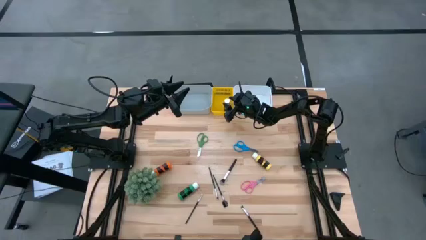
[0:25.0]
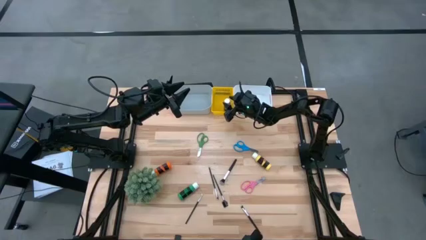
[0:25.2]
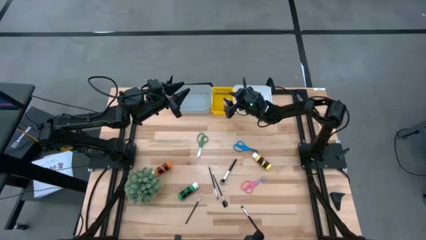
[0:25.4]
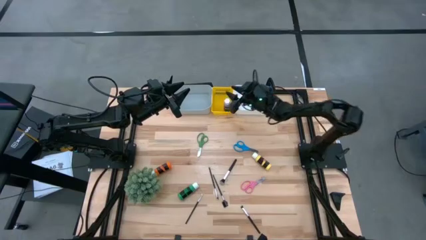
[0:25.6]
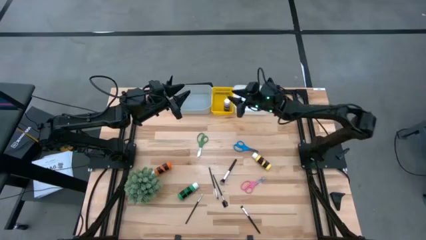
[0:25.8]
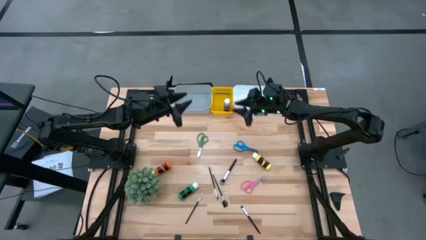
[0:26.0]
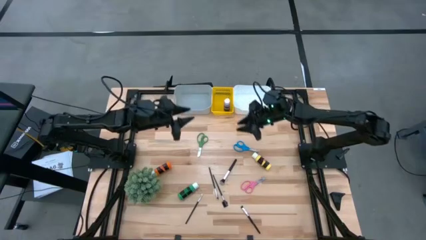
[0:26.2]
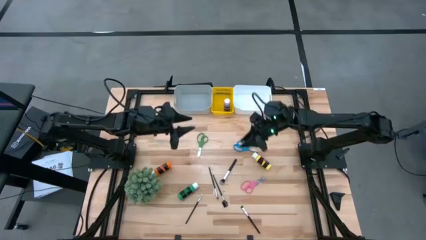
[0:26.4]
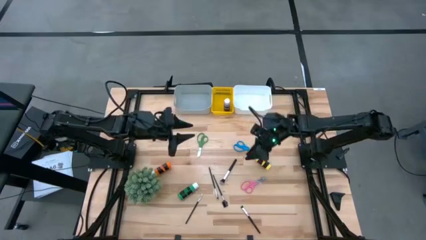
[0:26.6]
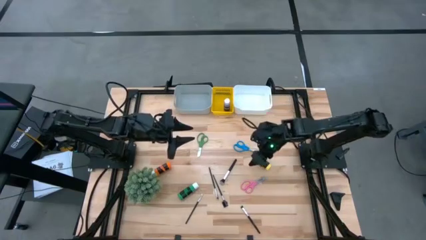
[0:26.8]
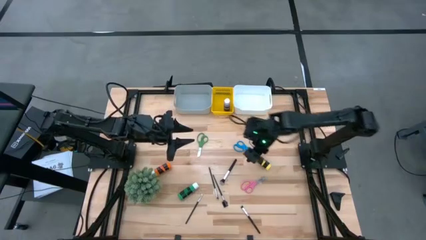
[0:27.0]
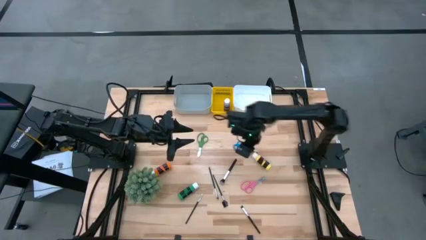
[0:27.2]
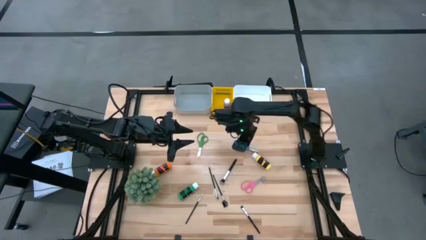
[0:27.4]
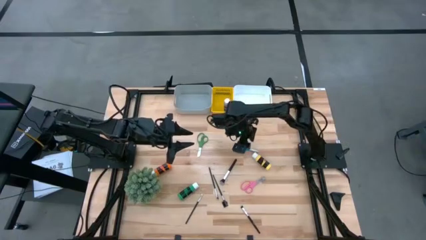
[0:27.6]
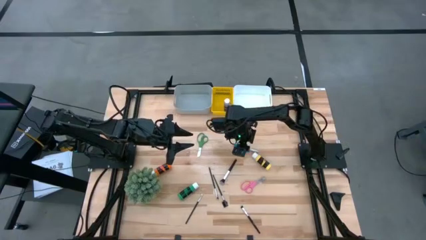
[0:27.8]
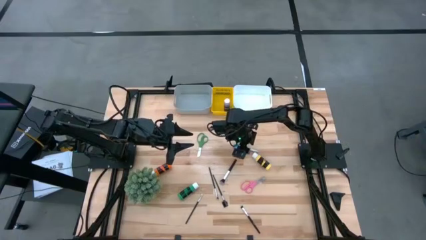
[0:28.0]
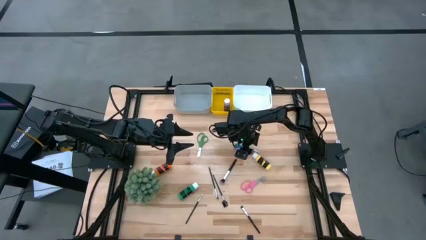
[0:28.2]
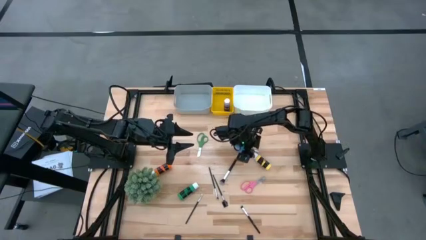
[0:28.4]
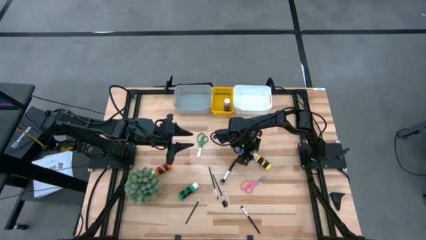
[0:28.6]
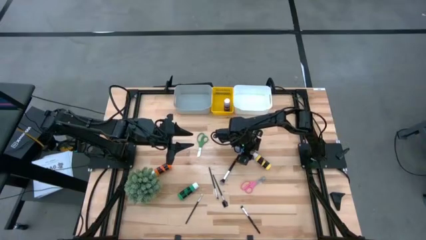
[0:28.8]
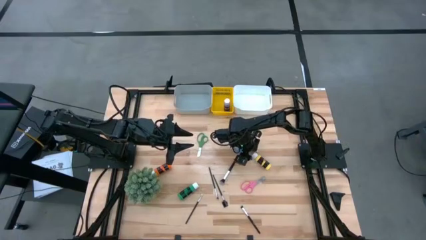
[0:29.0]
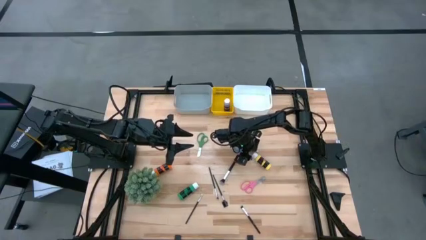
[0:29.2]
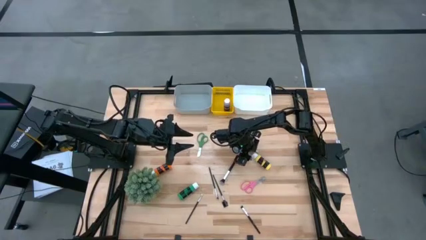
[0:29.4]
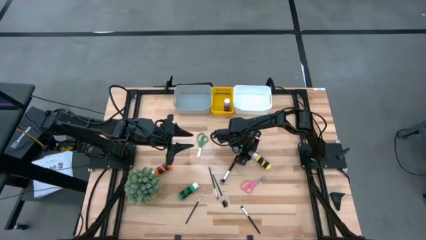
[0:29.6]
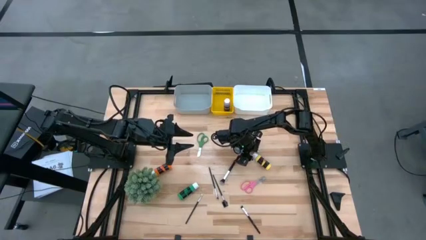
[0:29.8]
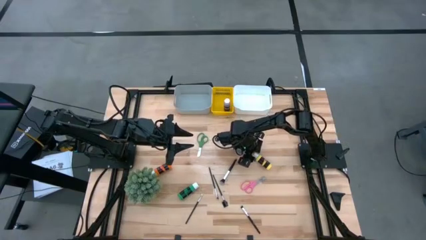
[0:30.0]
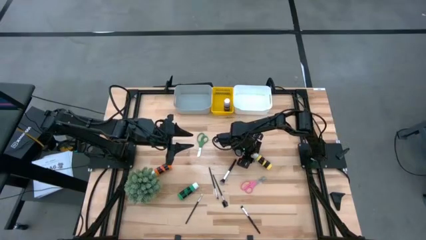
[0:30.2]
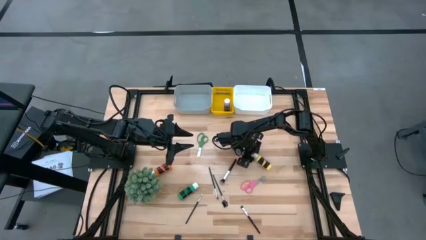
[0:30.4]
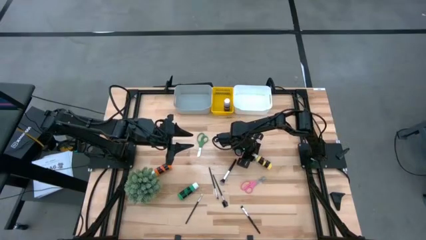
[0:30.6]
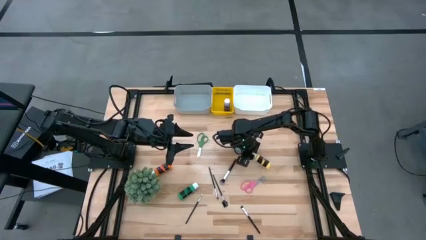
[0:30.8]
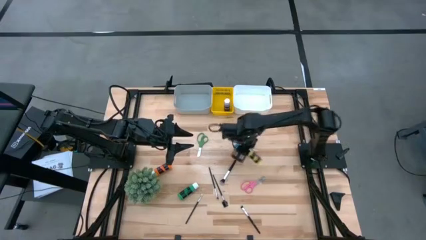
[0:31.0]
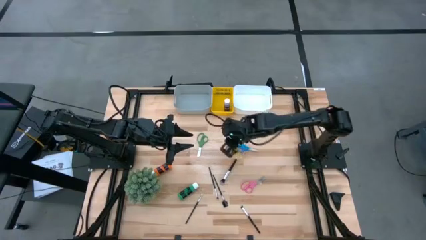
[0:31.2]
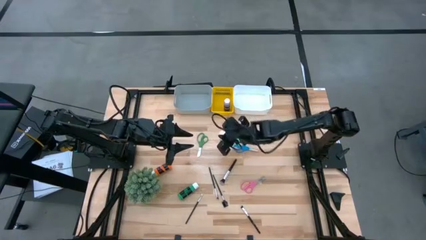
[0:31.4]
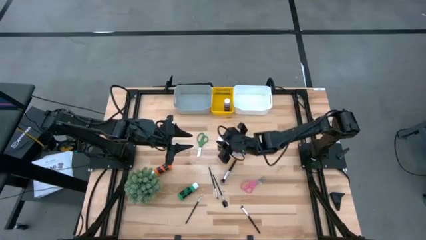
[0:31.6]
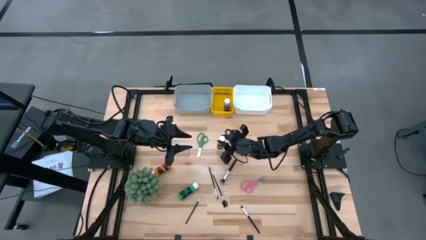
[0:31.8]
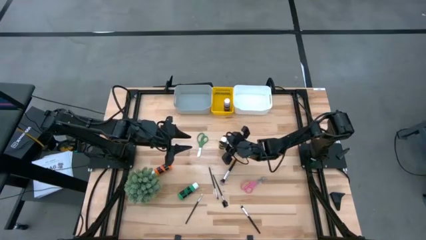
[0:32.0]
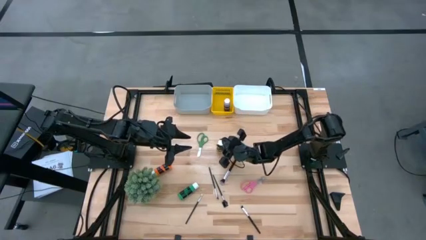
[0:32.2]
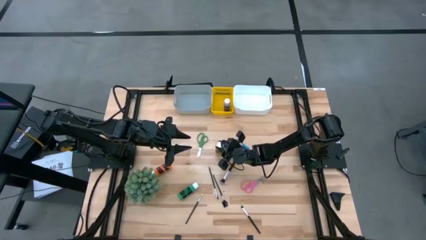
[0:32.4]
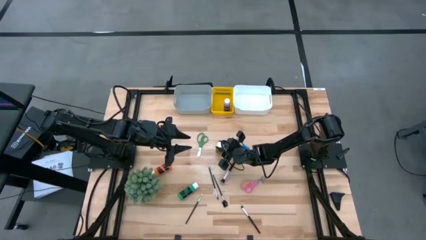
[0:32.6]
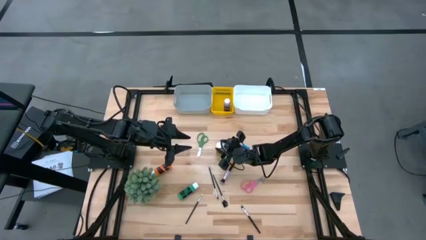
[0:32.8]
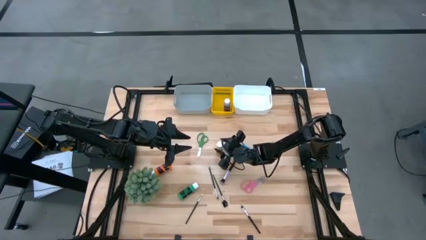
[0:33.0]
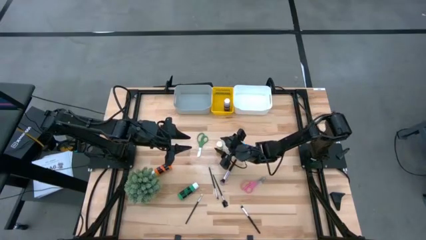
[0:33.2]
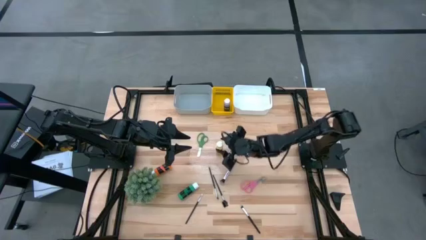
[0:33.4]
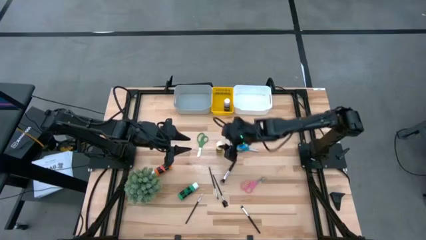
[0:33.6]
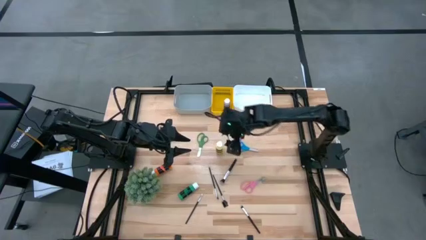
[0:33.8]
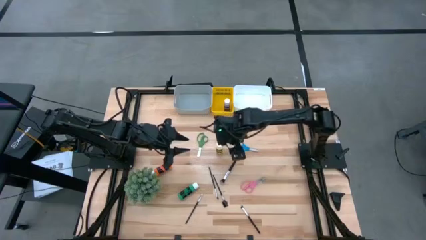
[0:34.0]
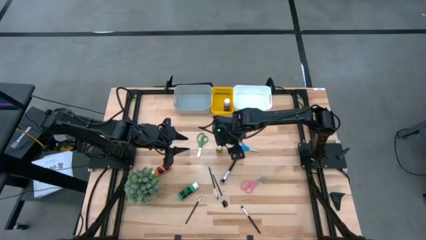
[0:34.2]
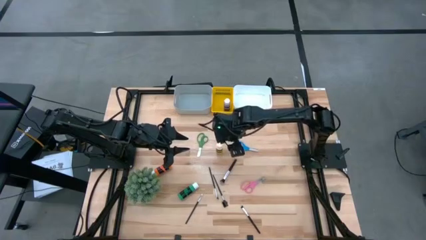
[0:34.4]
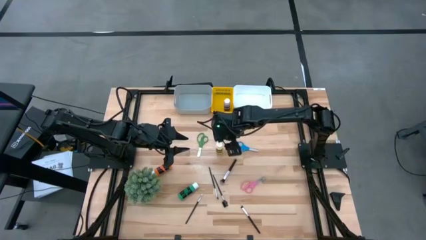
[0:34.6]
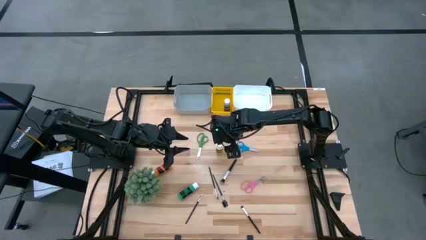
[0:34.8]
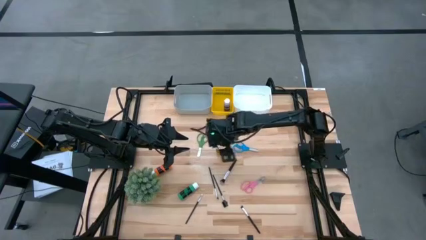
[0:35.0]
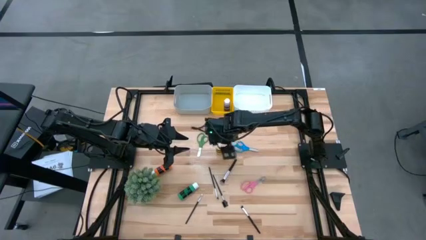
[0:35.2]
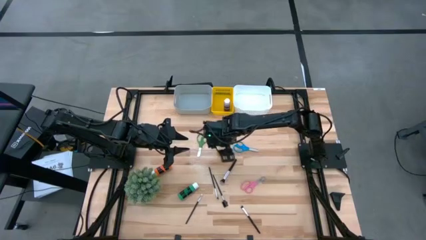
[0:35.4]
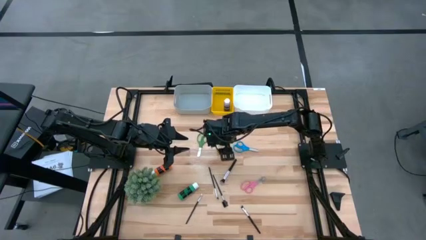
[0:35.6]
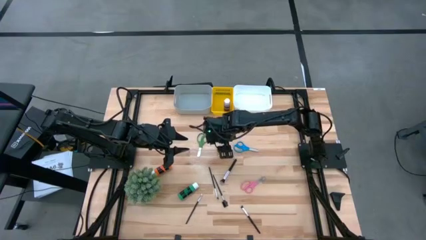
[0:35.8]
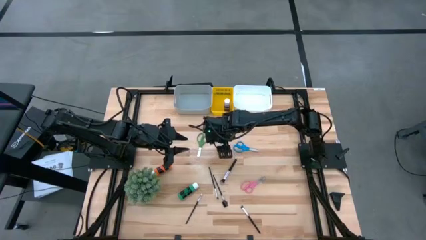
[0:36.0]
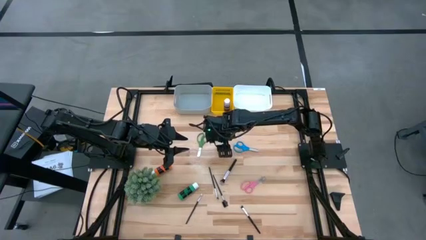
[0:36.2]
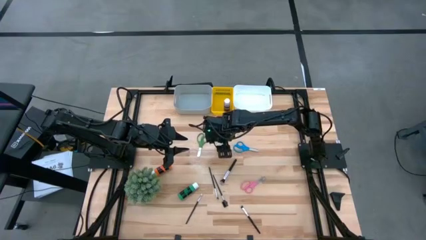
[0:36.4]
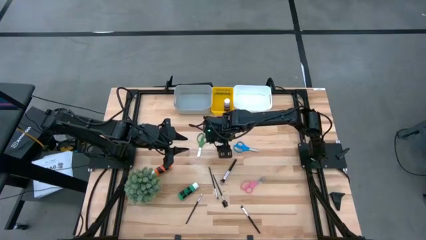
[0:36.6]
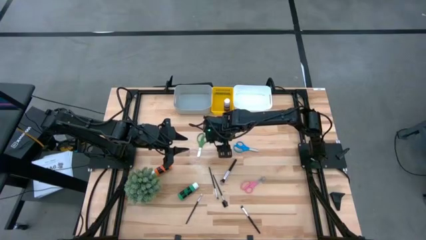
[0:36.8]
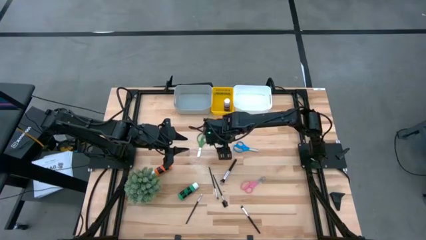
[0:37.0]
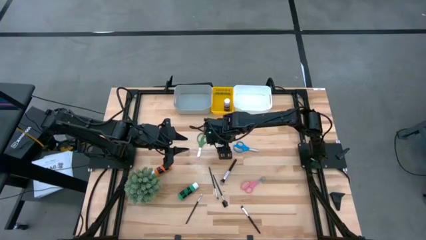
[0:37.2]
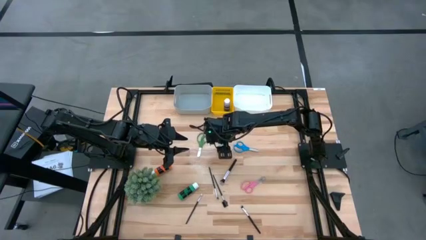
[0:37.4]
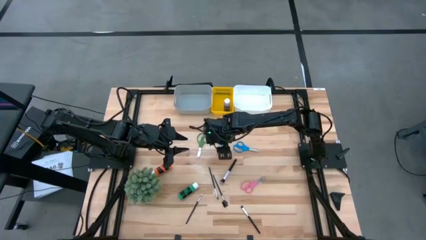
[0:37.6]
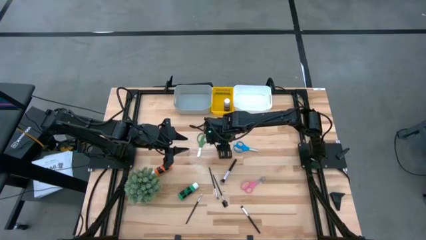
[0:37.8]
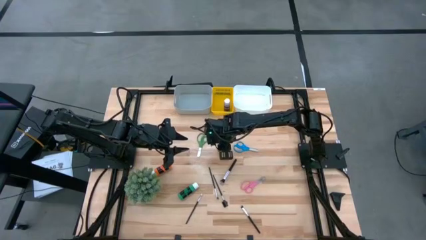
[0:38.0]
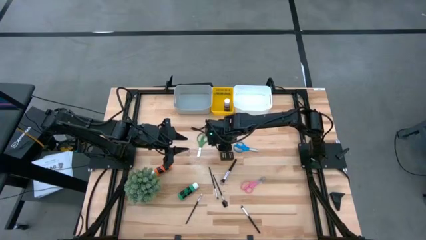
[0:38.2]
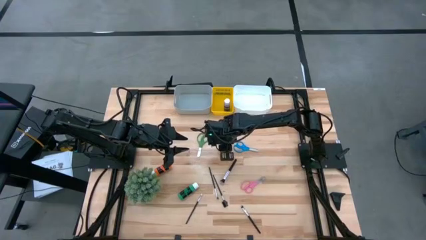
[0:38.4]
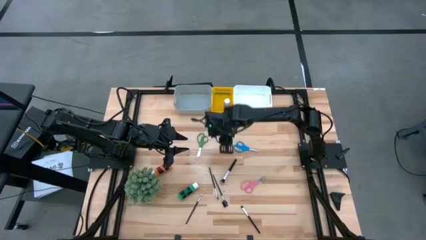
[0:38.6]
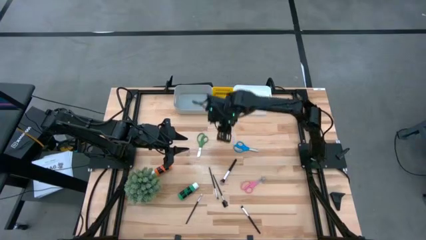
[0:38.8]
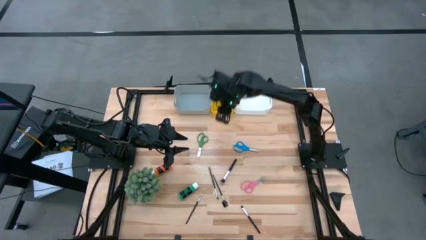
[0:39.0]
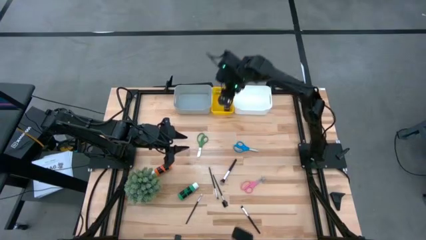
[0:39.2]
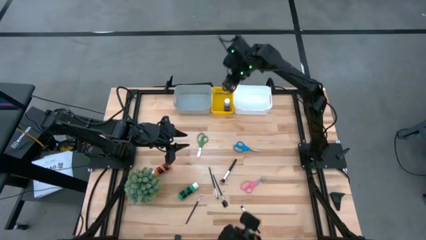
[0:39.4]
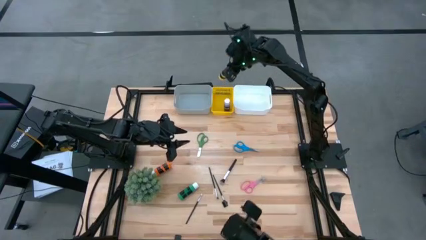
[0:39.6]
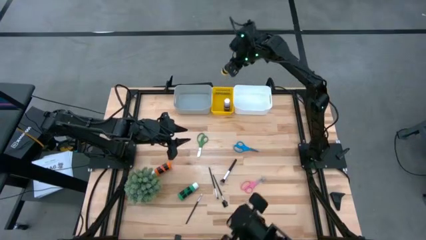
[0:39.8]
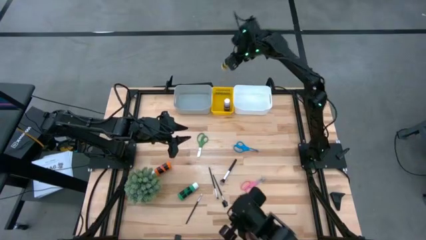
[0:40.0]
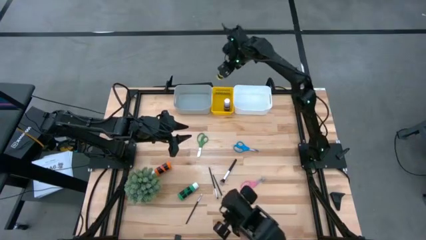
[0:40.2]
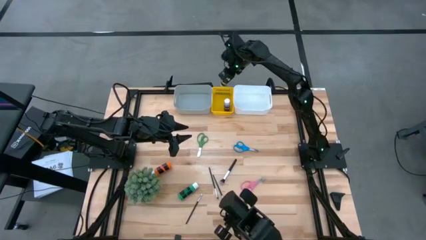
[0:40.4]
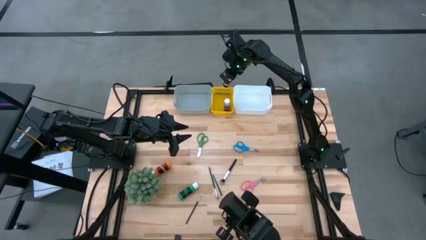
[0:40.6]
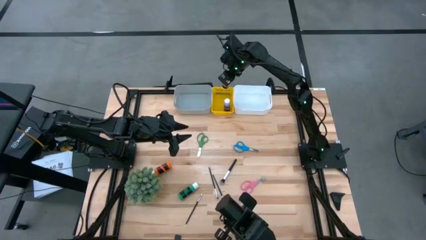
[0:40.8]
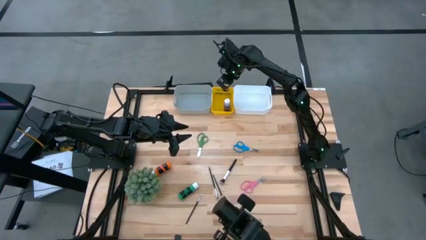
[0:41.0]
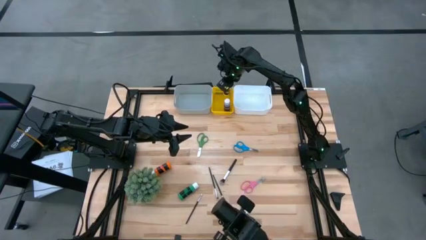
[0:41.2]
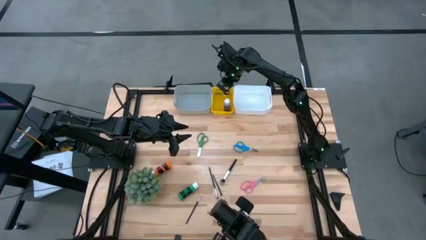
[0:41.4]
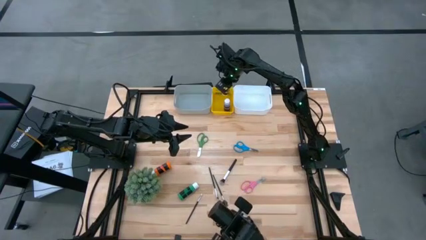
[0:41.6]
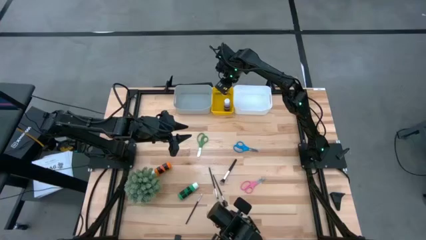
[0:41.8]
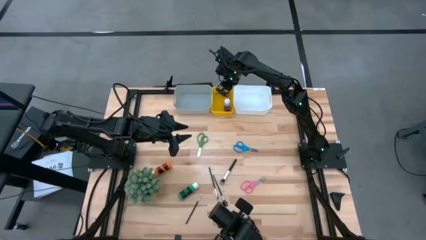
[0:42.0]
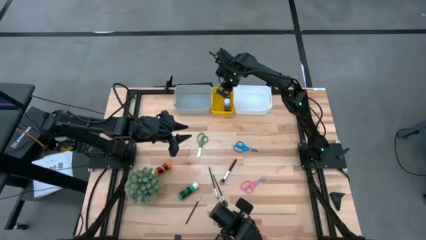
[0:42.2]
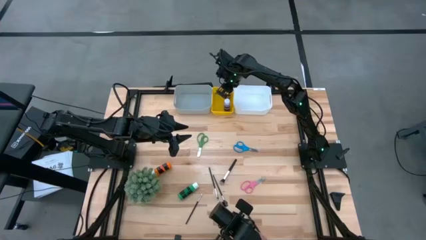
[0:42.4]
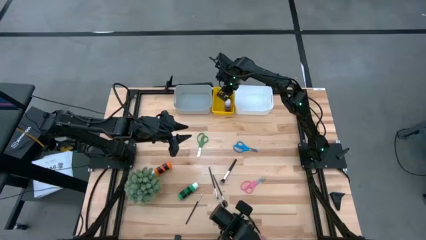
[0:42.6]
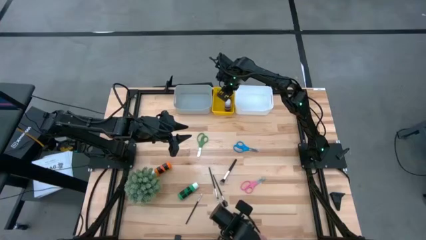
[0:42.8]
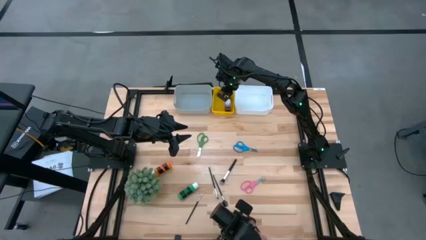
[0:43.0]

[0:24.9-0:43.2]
Task: Pick & Place Paint Supplies
Put the yellow paint bottle into the yellow bin
